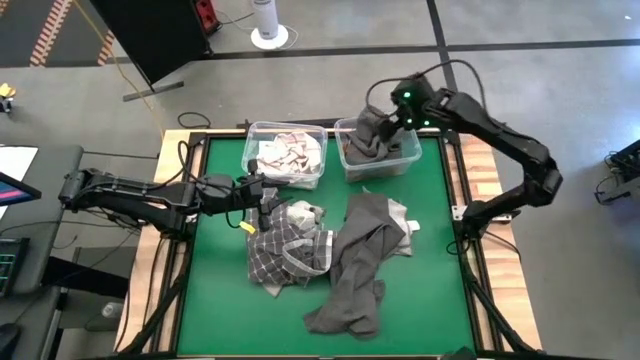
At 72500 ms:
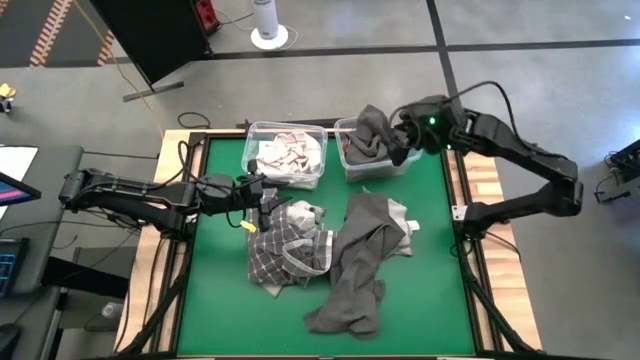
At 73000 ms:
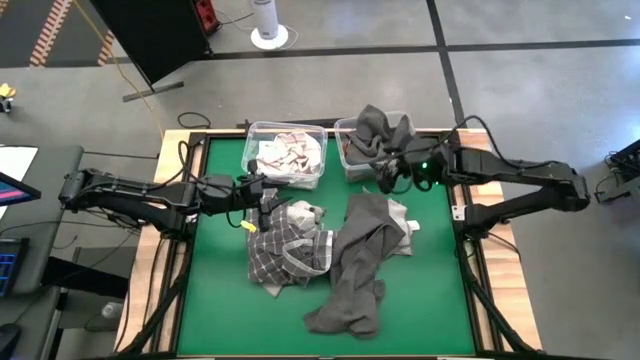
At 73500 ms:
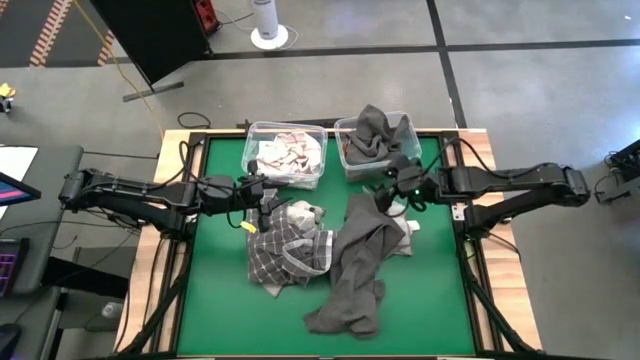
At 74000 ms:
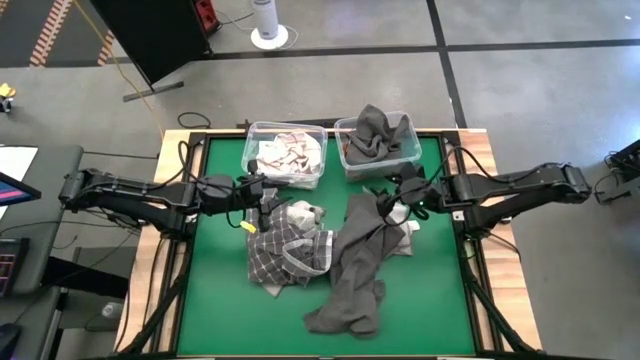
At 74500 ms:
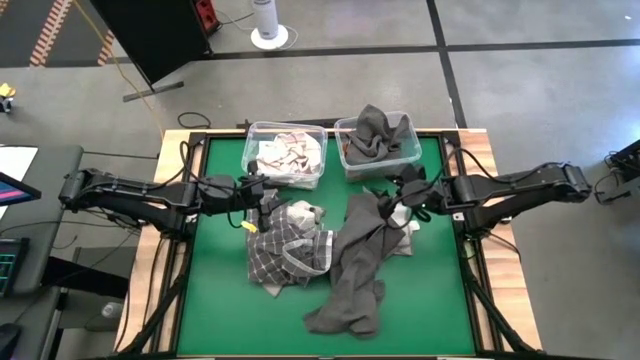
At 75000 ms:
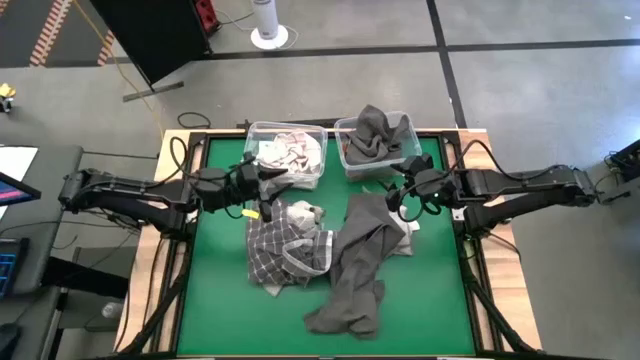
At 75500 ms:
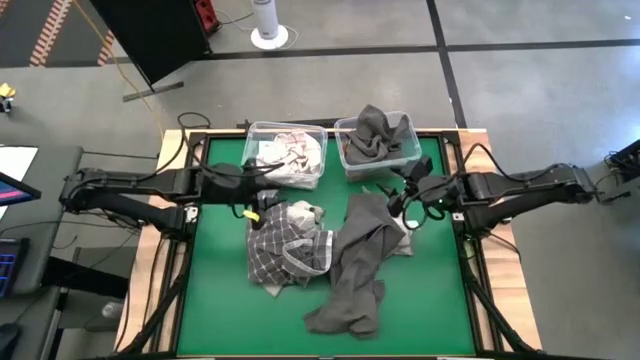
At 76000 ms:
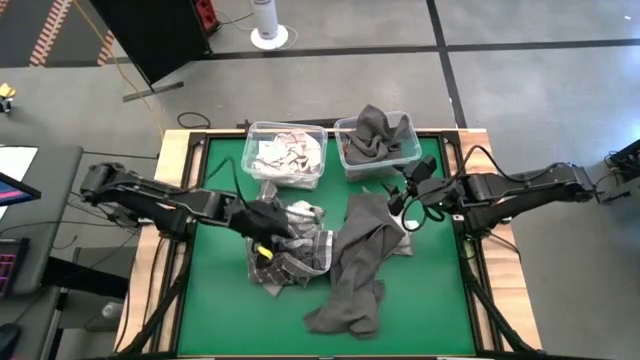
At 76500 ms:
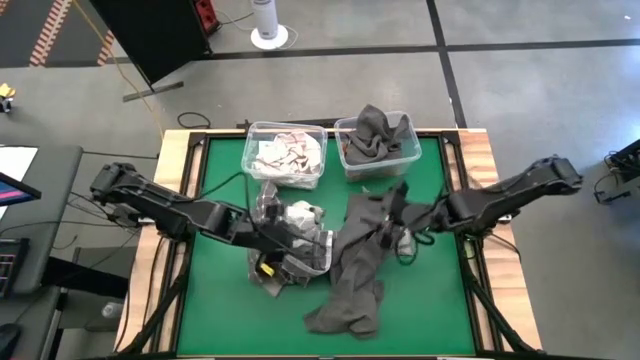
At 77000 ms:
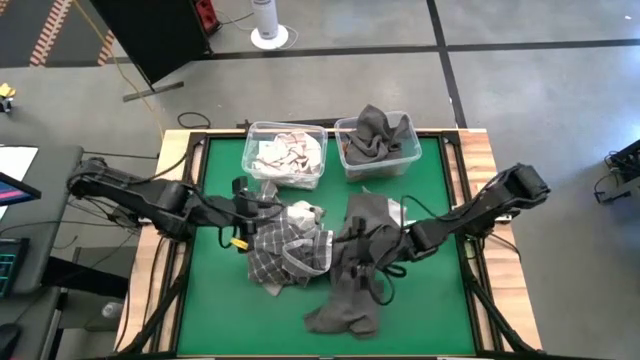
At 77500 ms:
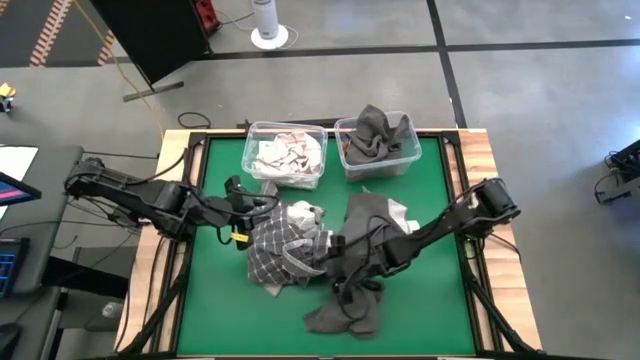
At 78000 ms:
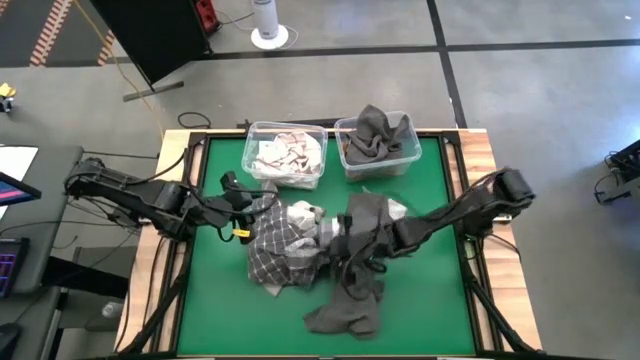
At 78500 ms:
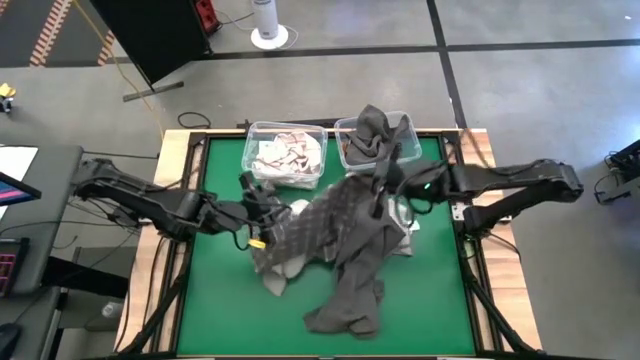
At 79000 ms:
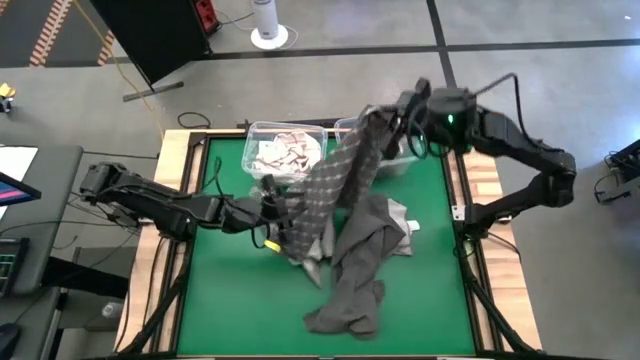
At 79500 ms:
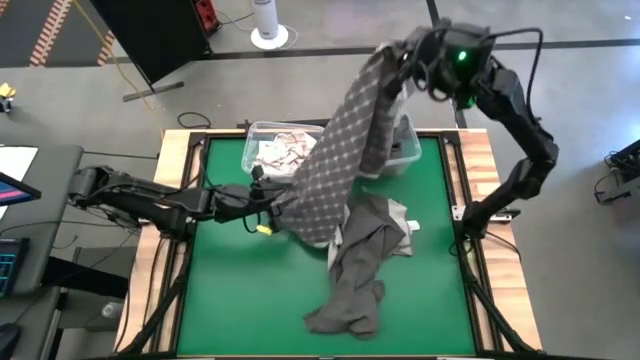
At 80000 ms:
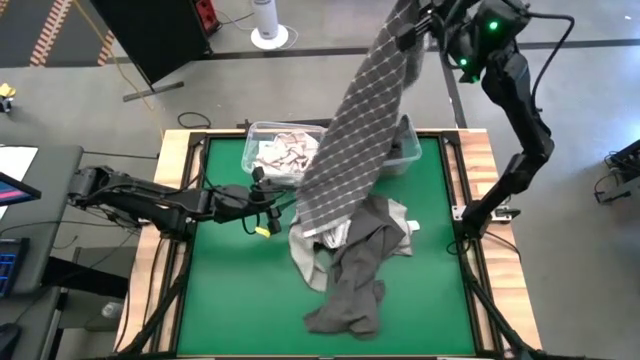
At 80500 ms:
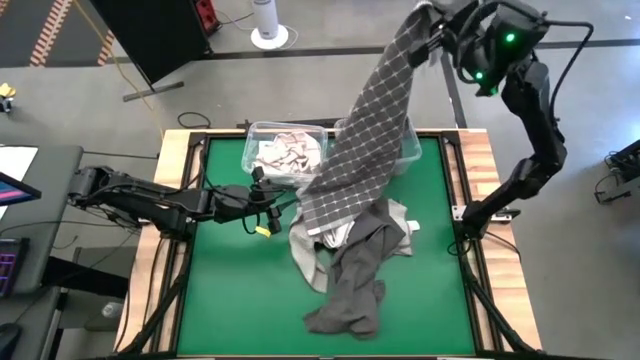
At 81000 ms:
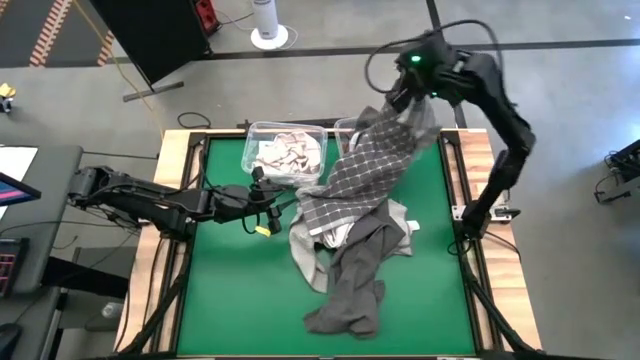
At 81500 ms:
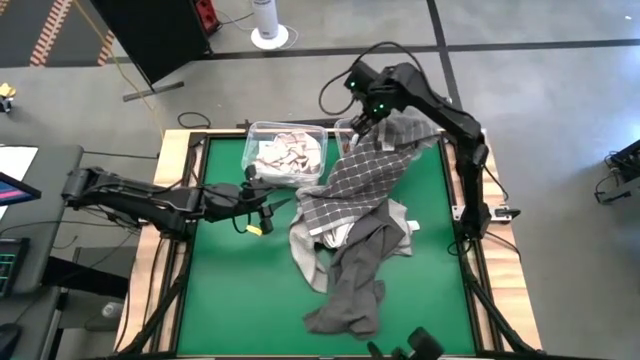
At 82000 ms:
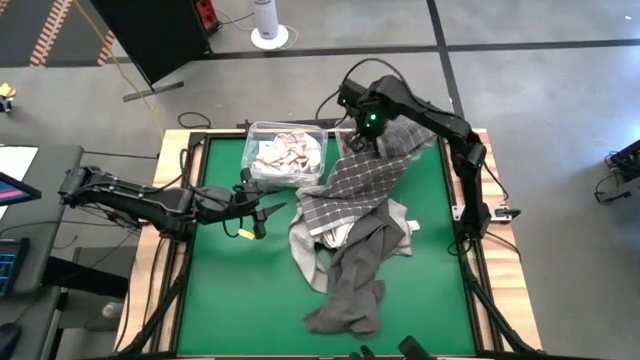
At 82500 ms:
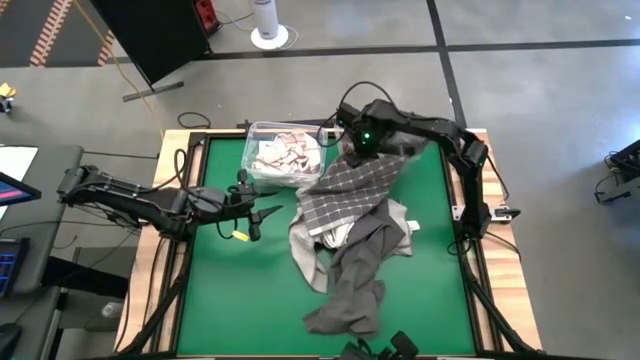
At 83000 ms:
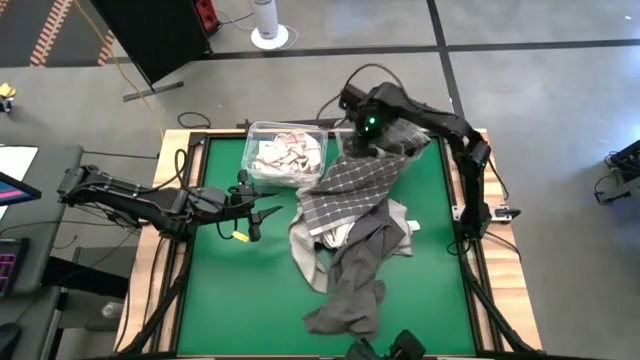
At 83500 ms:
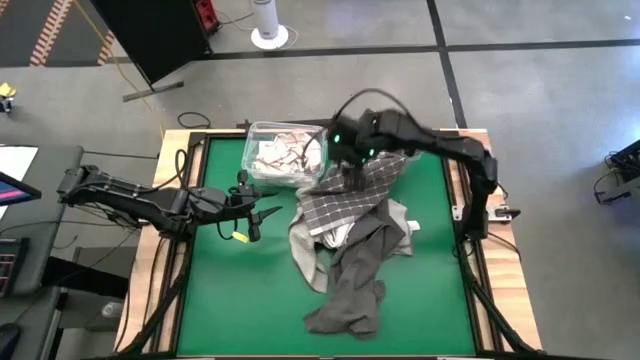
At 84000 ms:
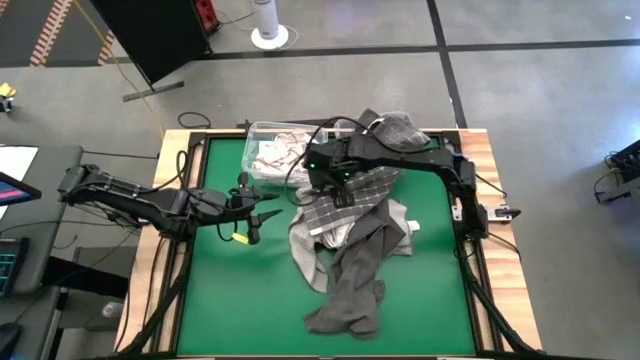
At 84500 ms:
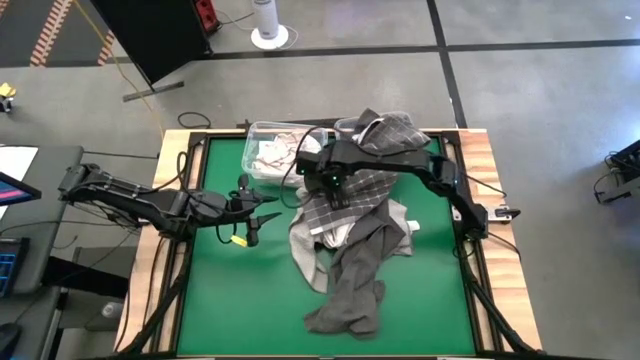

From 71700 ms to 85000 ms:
Task: Sort towels by color in basket
Put the black striped microfiber towel into the right transparent bin

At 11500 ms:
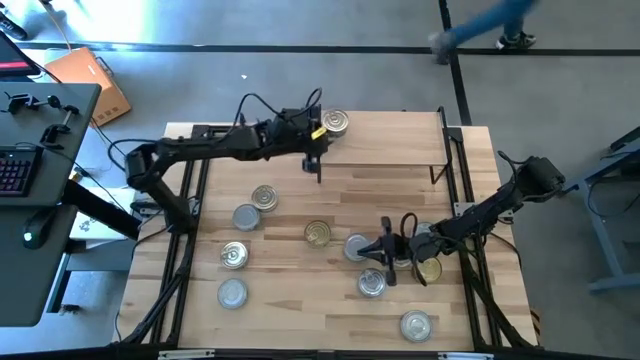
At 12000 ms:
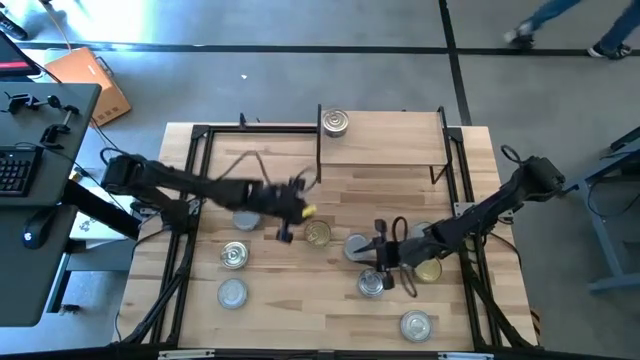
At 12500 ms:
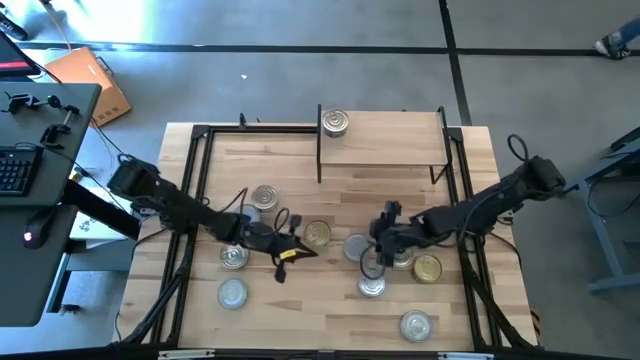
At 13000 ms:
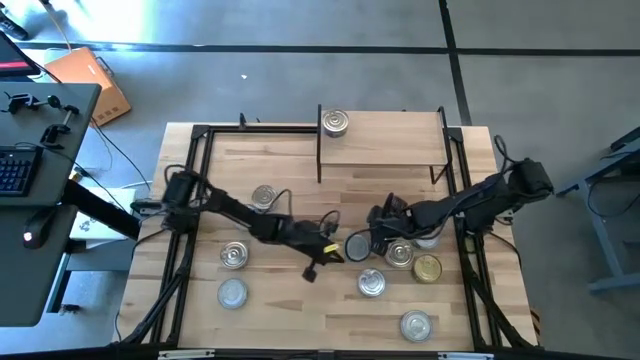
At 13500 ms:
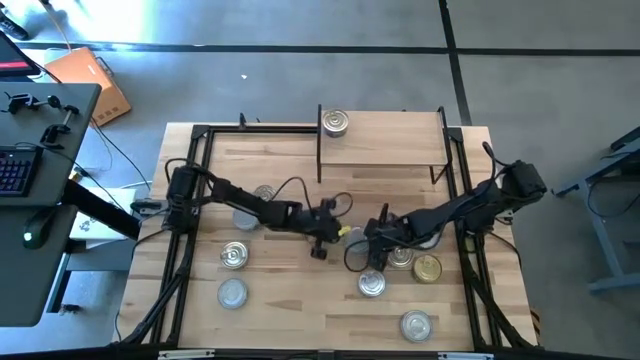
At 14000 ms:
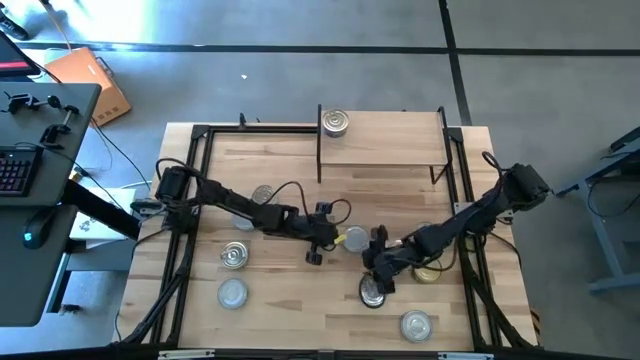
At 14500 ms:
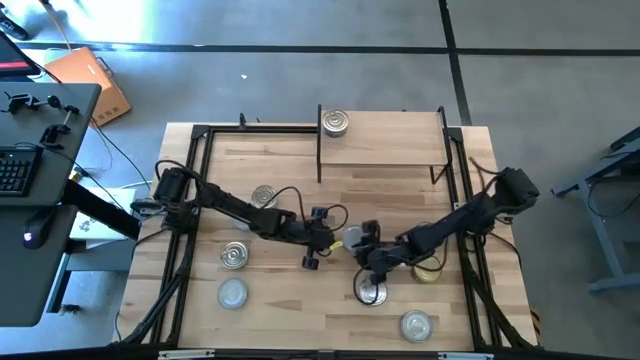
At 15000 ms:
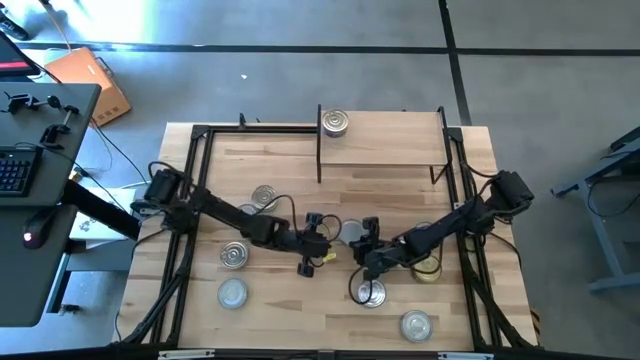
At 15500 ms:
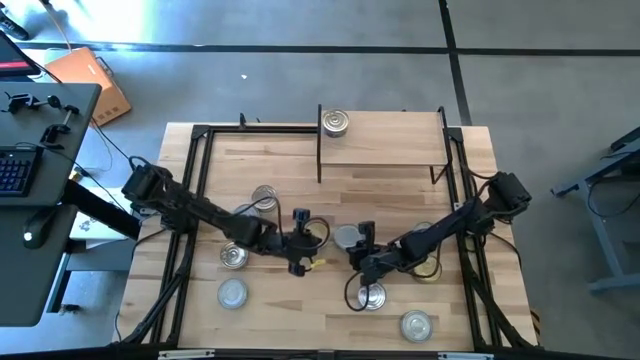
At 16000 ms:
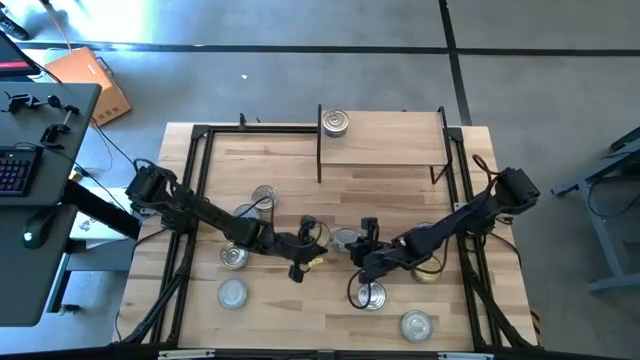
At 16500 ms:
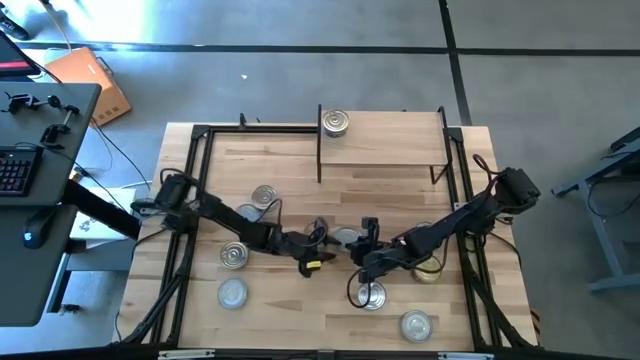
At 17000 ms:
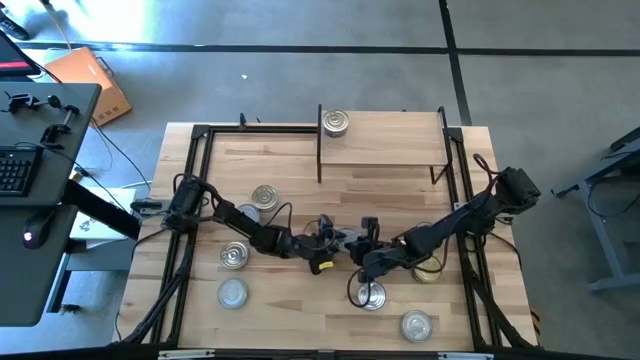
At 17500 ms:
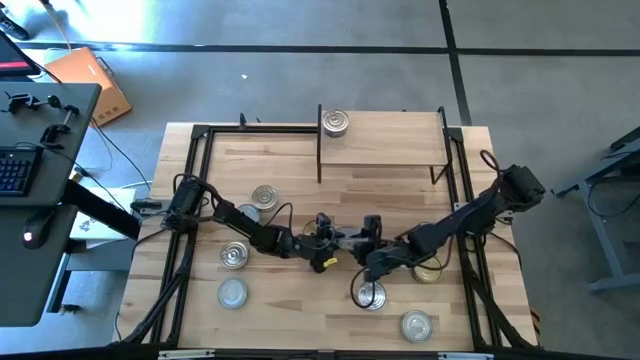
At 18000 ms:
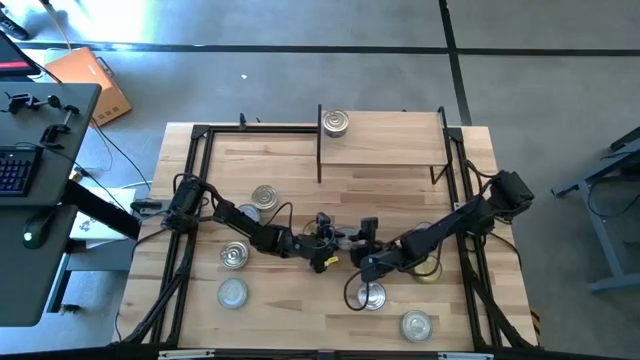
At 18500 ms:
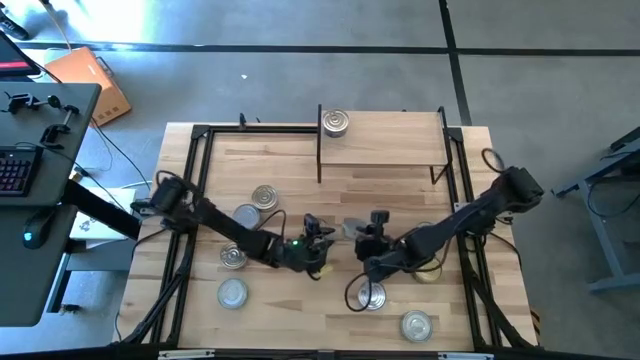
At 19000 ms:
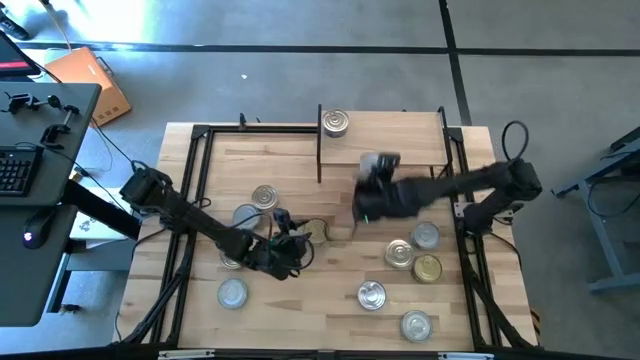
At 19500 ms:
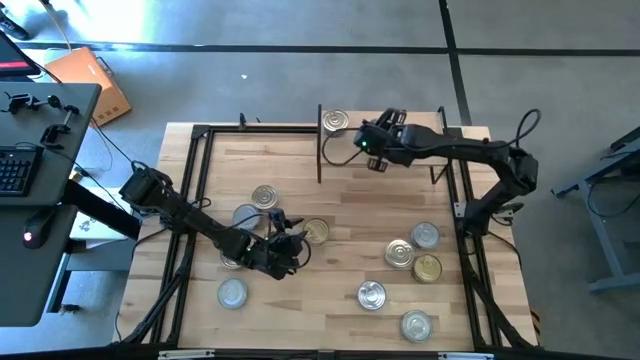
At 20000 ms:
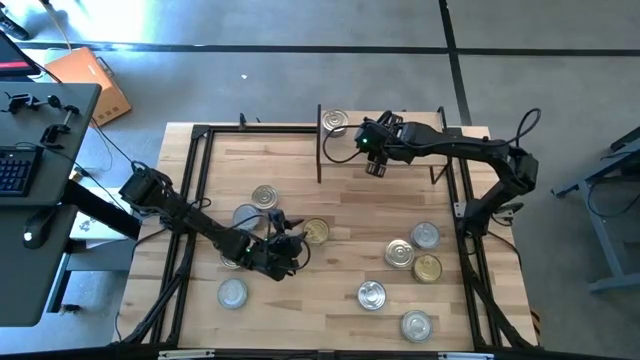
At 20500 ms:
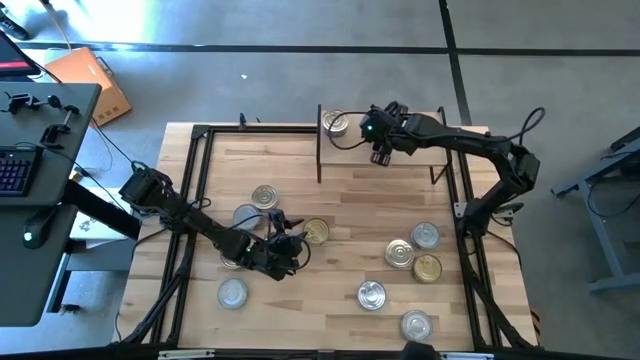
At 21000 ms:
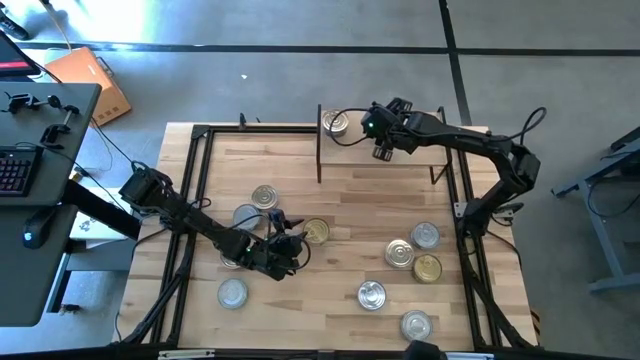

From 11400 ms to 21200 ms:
Task: Stack canned seafood by type on shelf
Put the white green tuna can on the shelf
